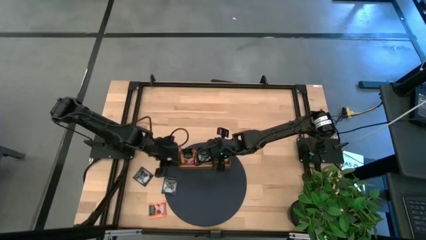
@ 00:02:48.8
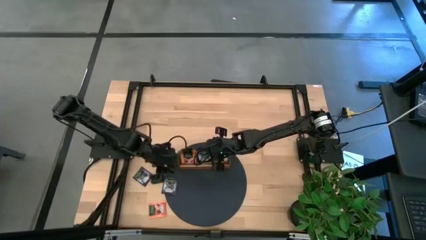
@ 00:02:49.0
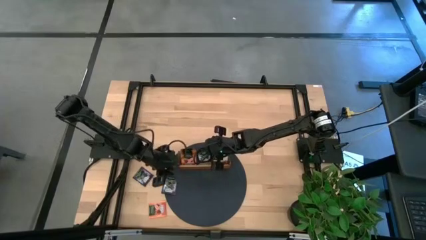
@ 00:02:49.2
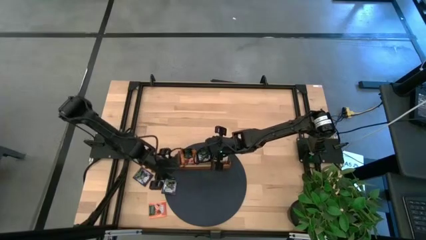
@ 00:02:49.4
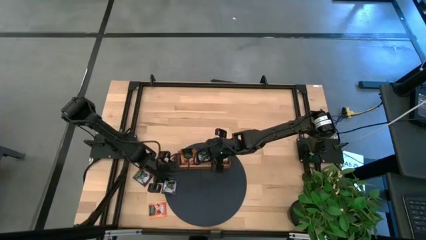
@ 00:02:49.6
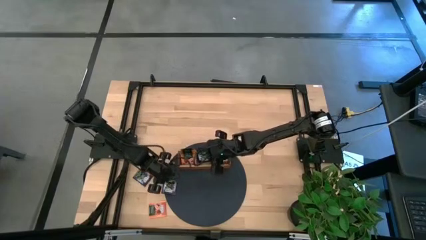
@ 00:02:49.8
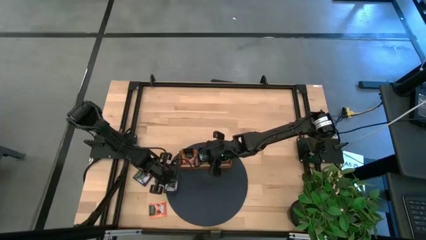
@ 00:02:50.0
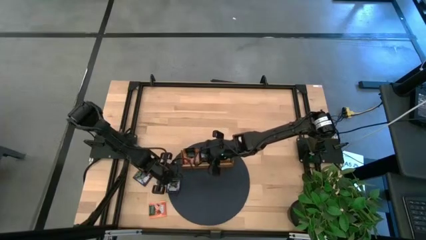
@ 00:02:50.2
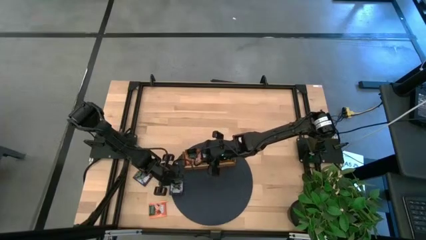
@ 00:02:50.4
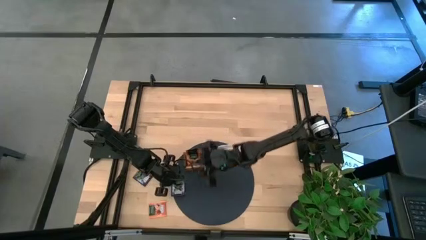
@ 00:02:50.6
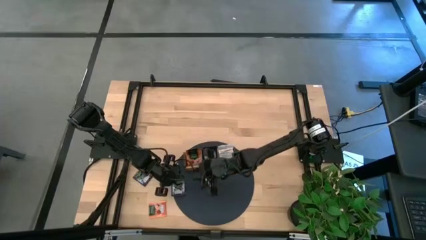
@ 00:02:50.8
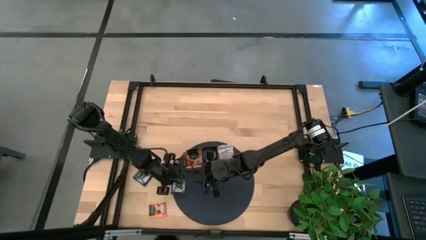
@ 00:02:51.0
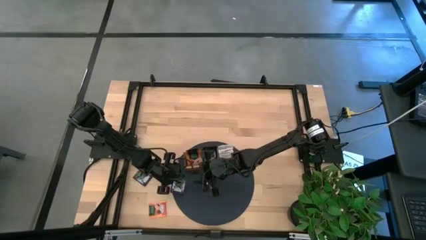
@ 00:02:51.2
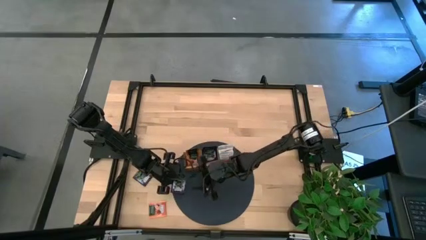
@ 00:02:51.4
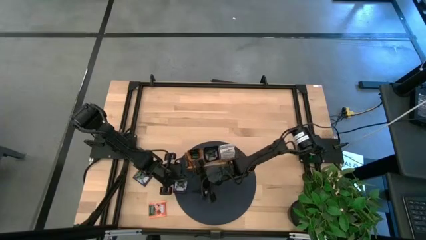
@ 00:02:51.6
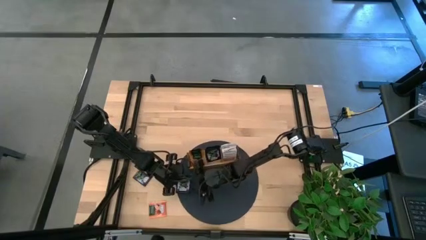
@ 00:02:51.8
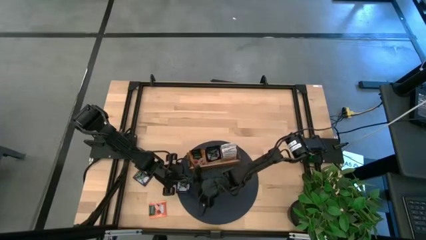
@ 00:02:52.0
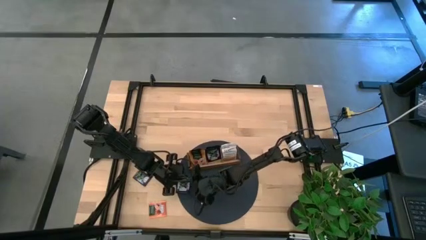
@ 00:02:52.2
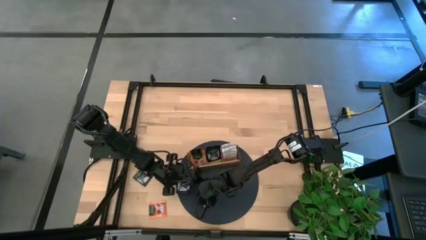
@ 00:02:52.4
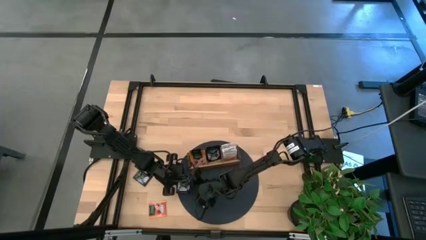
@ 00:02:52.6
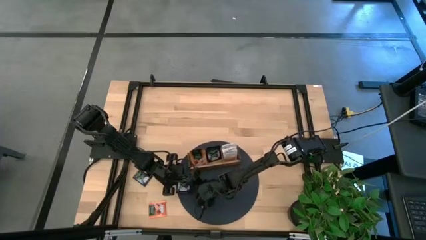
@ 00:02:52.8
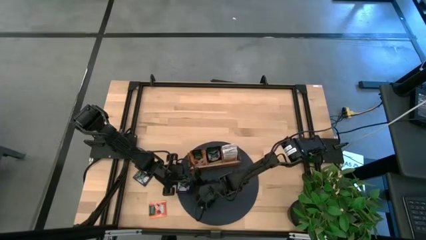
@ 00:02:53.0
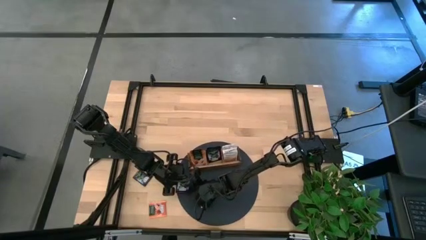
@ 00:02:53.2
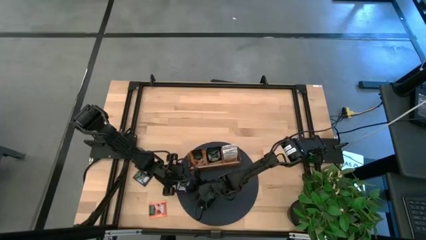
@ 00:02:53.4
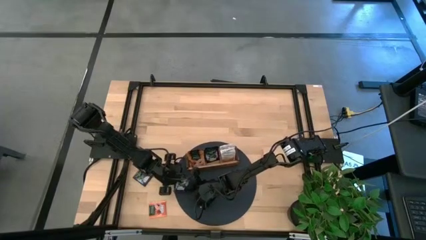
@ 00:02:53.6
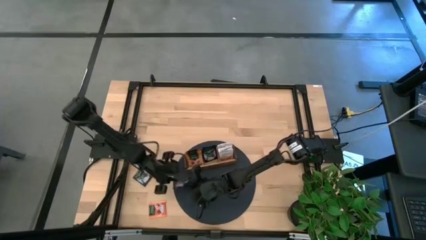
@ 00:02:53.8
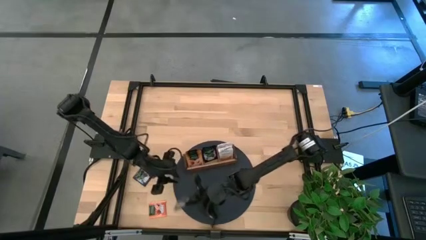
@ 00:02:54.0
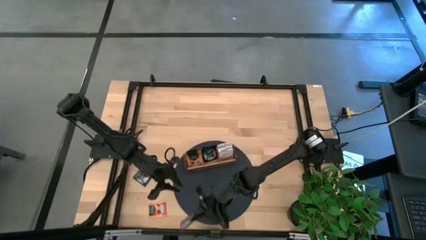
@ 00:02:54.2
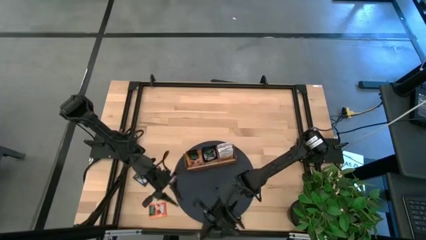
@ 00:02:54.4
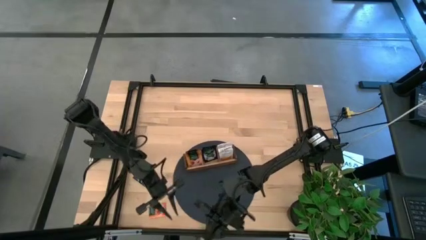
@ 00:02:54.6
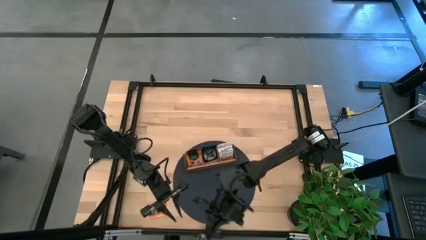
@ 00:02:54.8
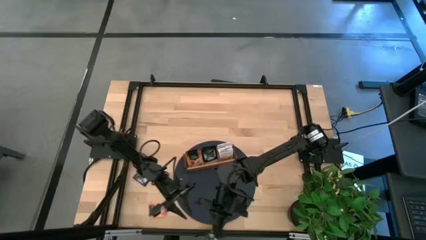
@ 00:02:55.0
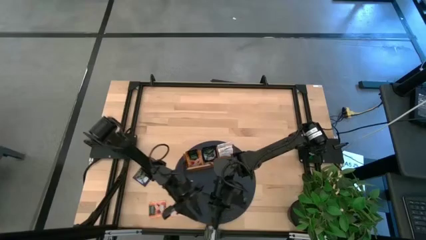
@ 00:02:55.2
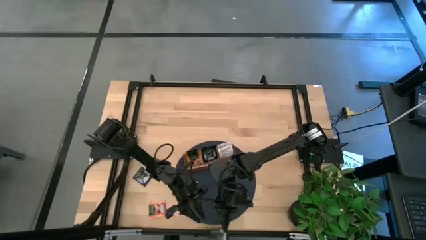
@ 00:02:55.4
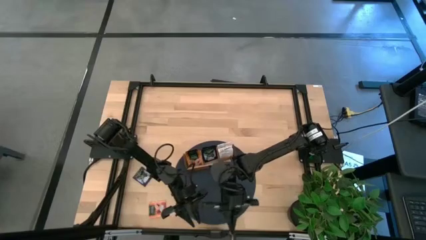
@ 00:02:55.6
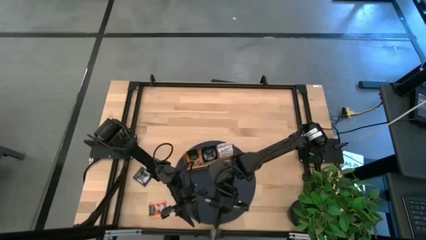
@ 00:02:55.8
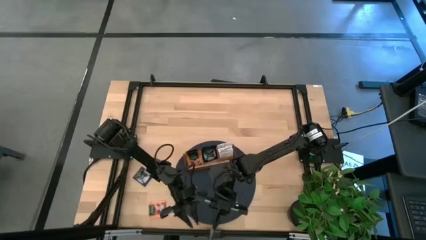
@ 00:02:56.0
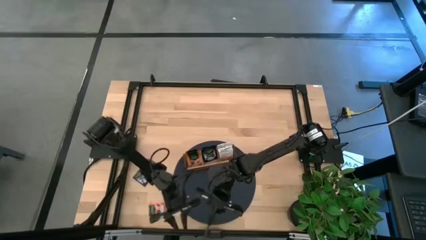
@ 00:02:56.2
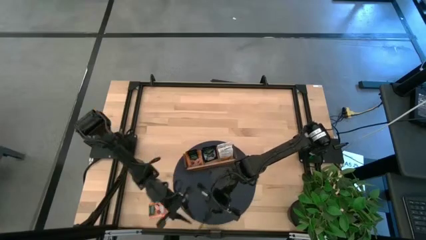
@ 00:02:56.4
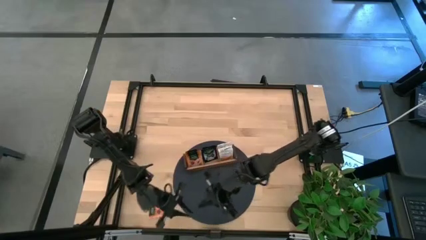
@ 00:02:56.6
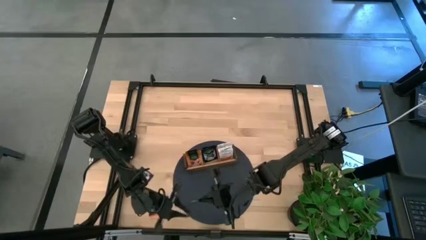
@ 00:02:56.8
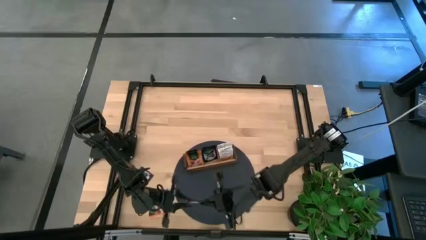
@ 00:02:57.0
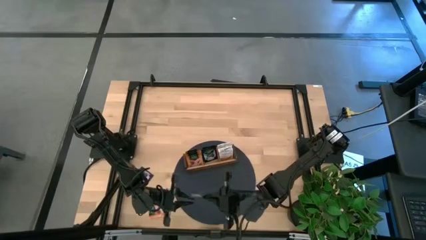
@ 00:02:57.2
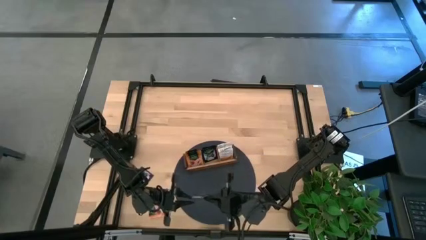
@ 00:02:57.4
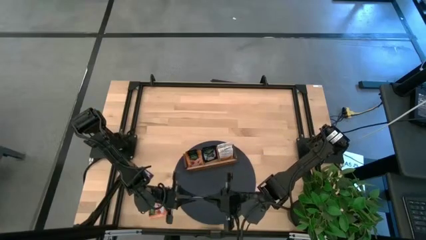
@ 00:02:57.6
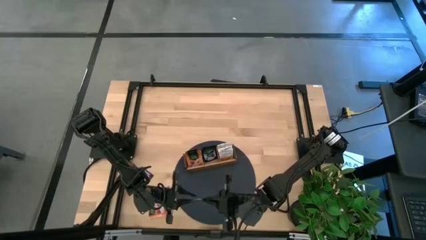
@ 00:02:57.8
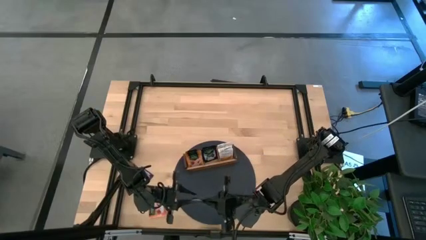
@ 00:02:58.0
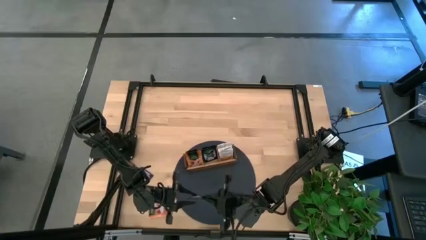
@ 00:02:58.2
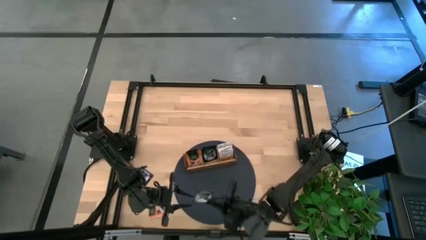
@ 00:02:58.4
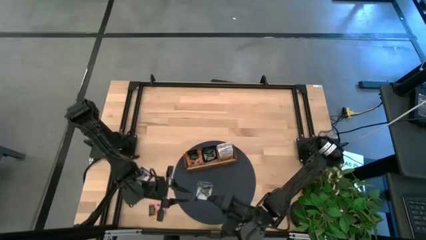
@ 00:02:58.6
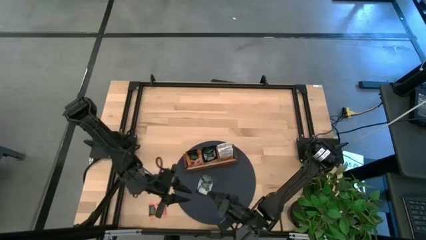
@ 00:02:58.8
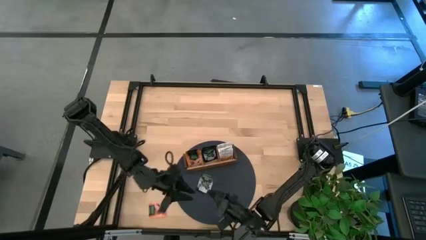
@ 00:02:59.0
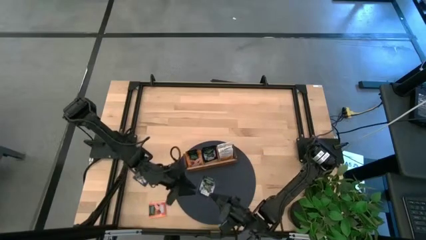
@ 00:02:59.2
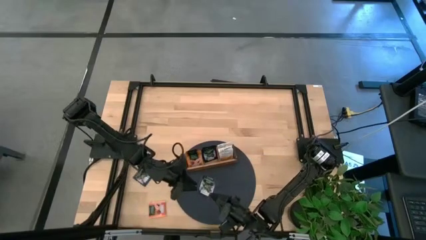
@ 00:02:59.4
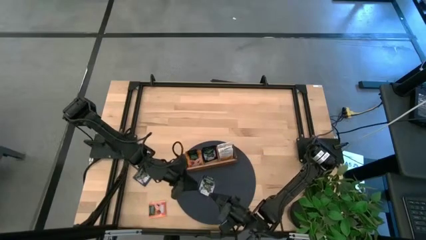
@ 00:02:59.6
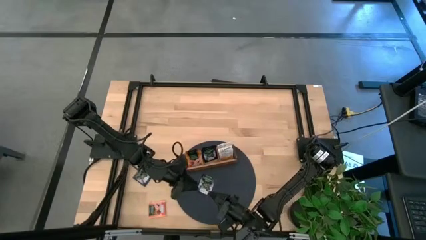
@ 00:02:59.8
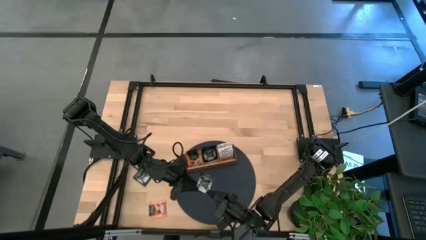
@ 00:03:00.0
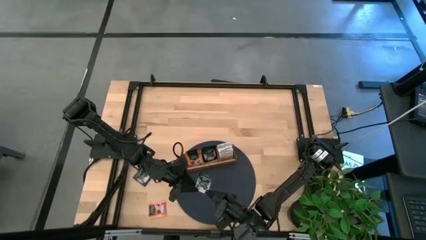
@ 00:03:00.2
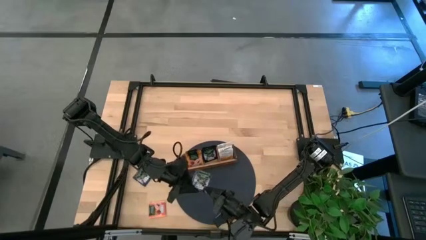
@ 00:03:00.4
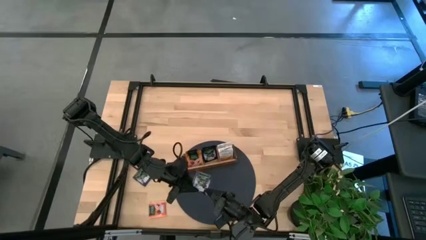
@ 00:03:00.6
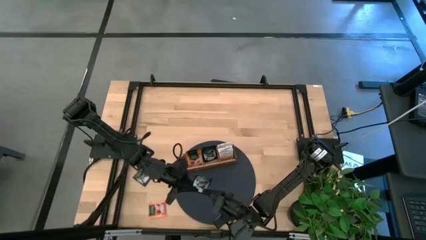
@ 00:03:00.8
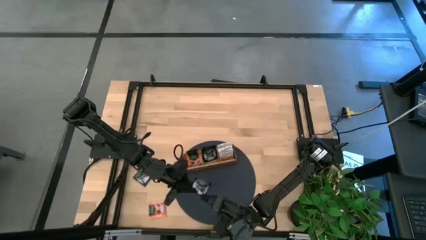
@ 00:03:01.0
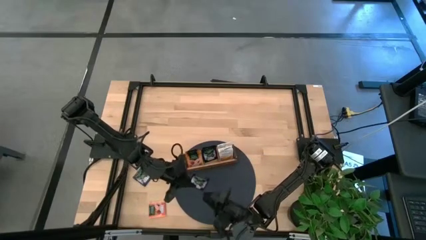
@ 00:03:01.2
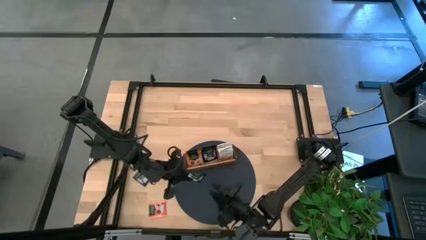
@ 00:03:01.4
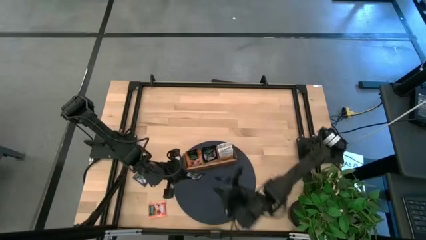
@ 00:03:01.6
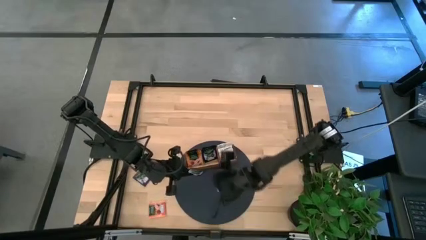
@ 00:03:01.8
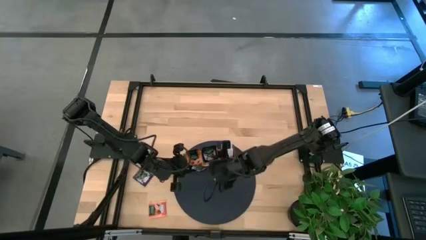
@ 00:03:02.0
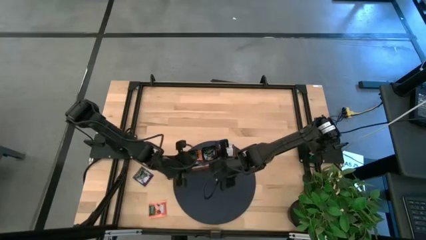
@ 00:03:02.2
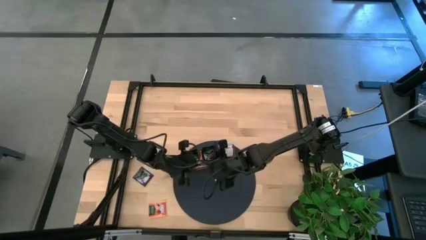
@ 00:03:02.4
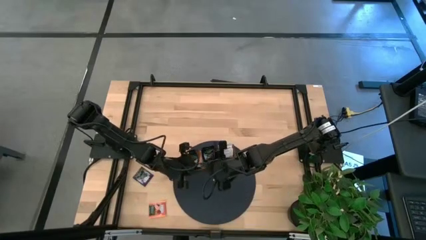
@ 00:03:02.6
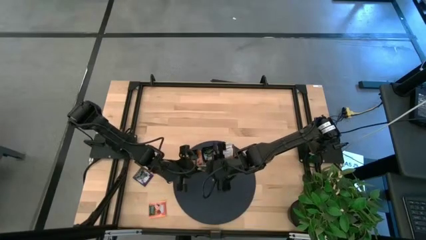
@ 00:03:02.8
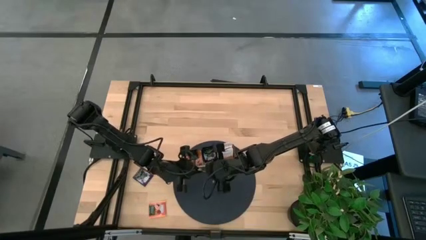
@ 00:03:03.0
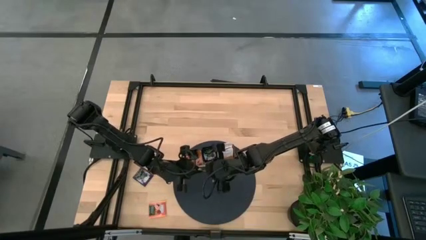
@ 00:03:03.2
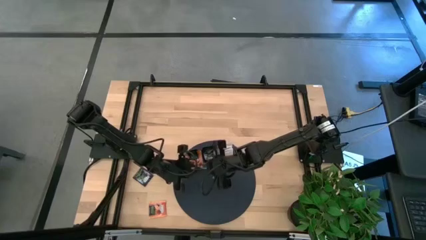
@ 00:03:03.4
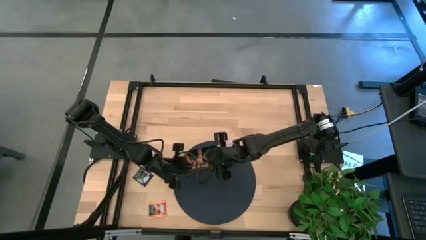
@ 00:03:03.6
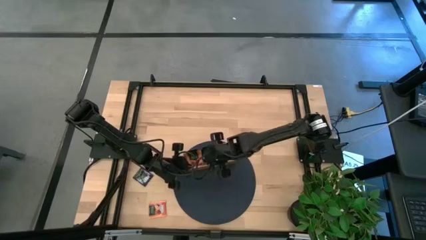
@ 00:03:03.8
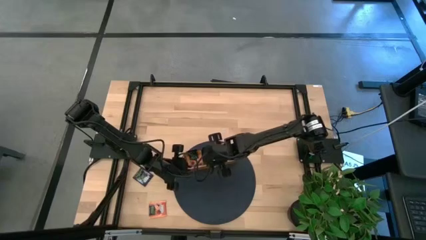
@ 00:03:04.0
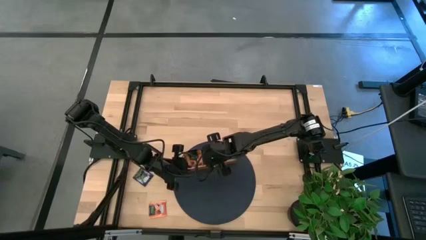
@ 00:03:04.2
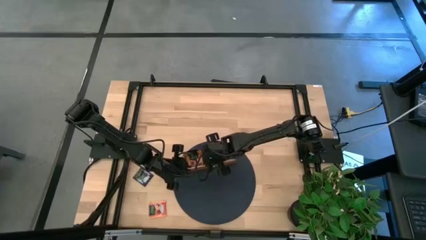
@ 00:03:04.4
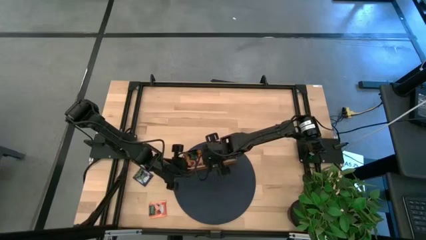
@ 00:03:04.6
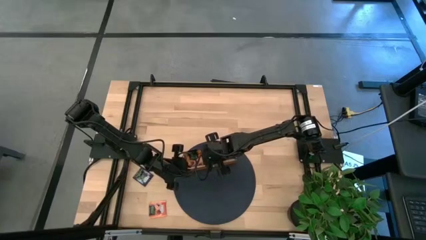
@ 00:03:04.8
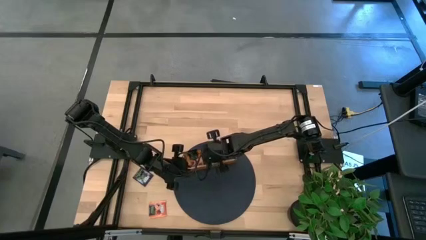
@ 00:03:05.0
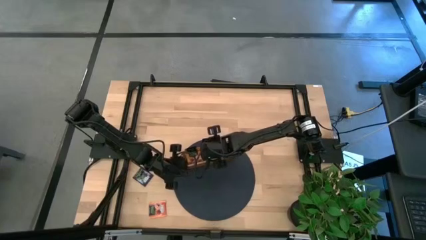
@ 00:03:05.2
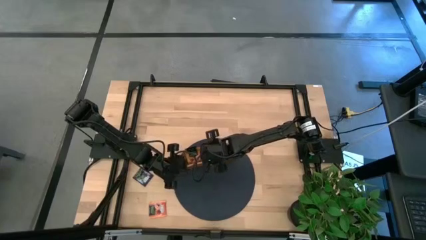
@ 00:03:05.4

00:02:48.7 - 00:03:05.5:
Task: Pick & Place Tea
Put the black tea bag into the middle section of the wooden organizer
